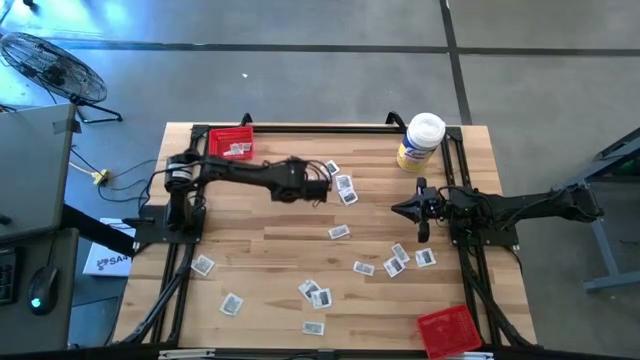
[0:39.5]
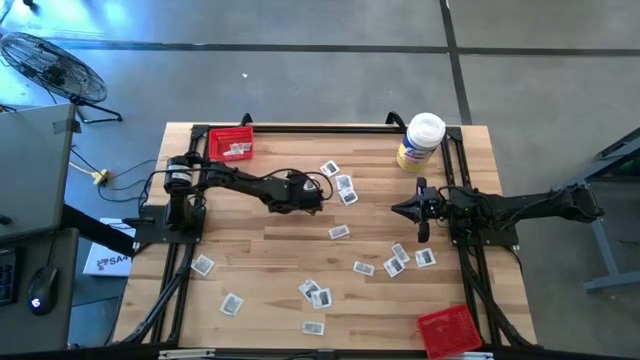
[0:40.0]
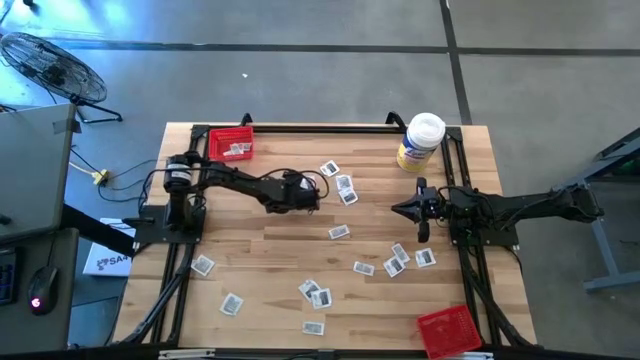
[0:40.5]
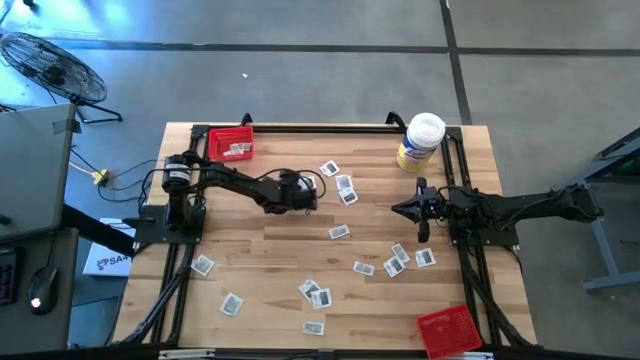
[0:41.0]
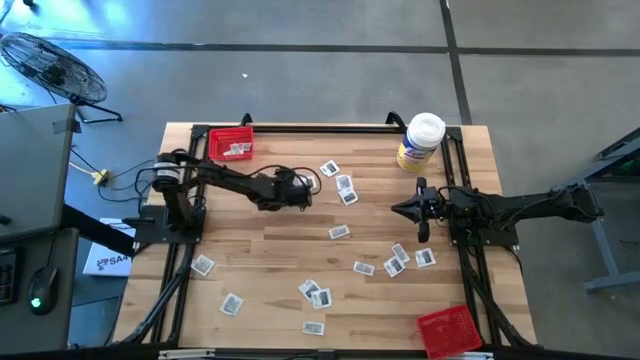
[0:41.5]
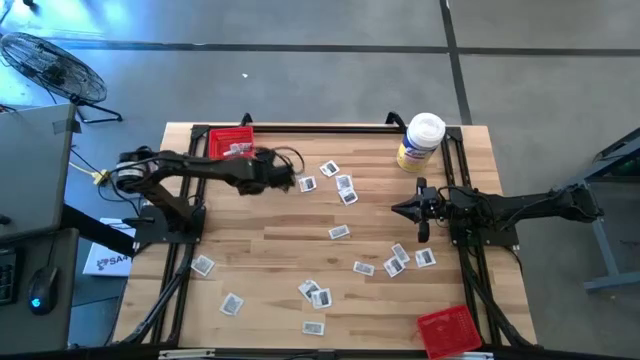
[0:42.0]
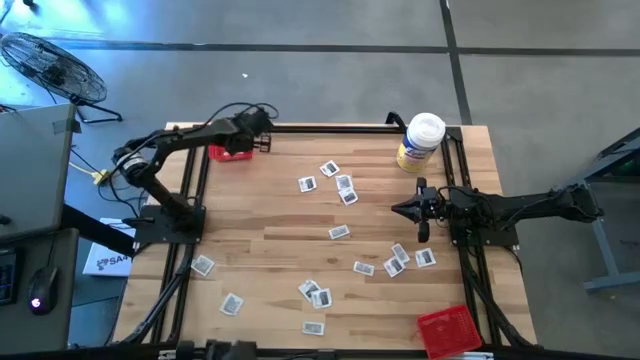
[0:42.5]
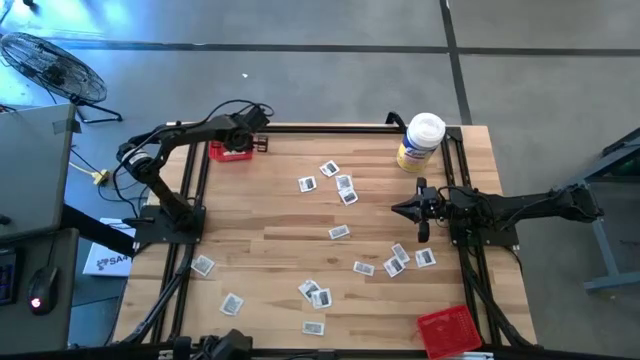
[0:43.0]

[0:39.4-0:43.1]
Task: Pick & Place First Aid Supplies
Put the white and orange ointment pack into the top red bin

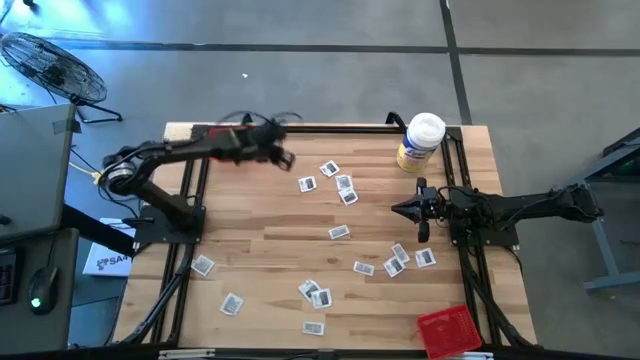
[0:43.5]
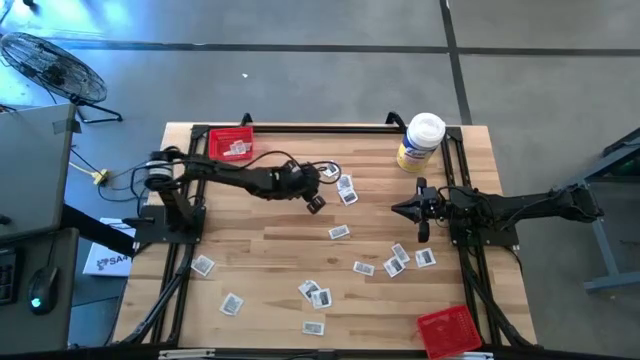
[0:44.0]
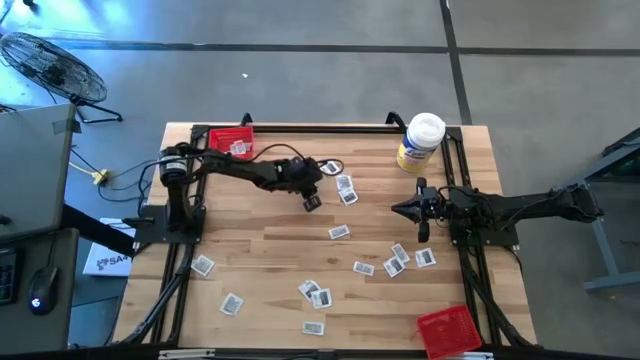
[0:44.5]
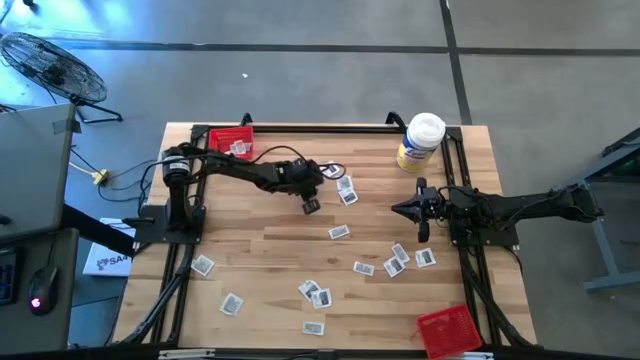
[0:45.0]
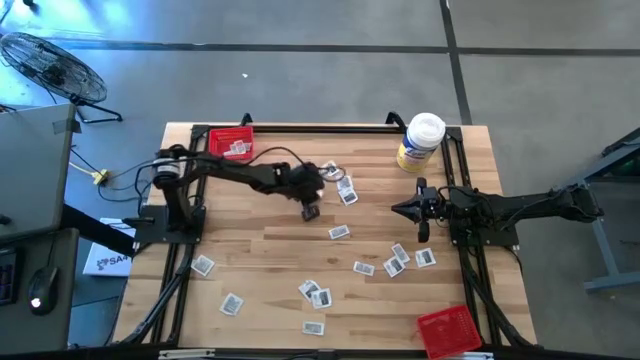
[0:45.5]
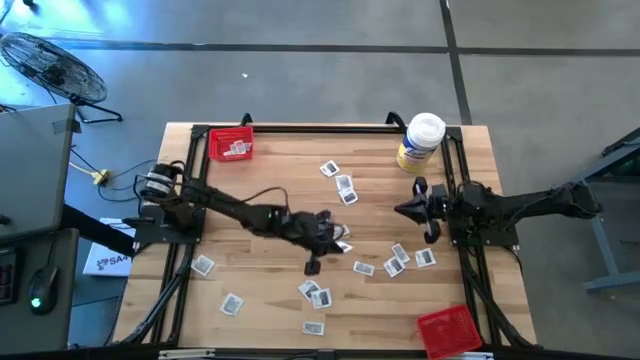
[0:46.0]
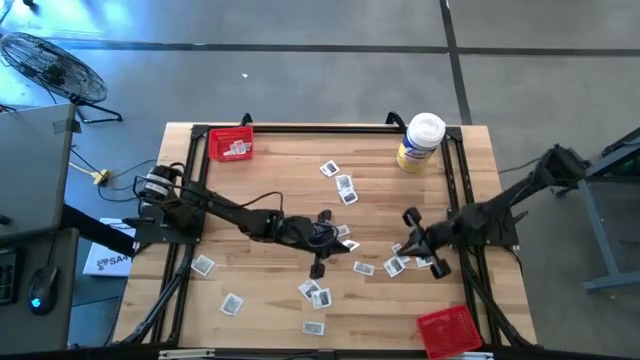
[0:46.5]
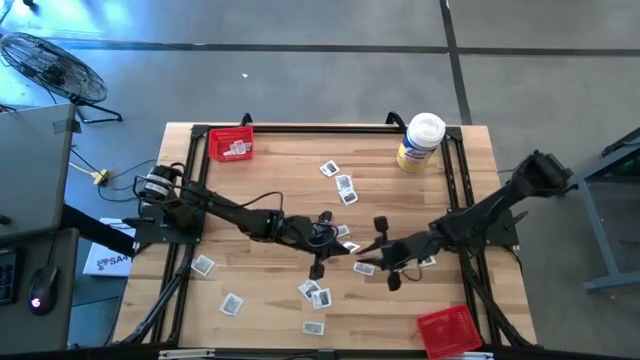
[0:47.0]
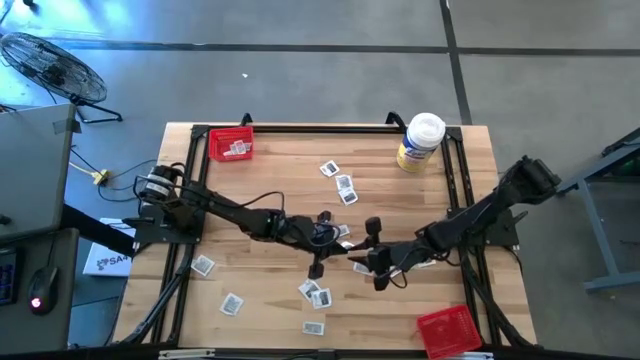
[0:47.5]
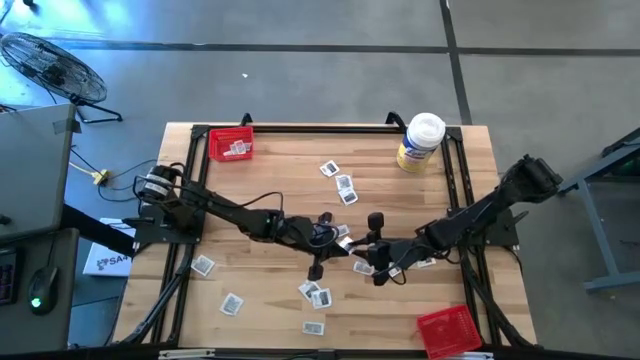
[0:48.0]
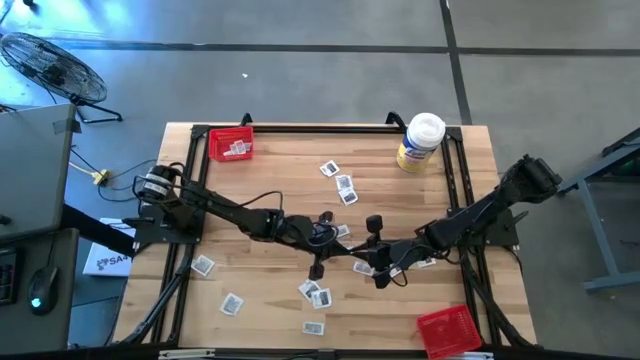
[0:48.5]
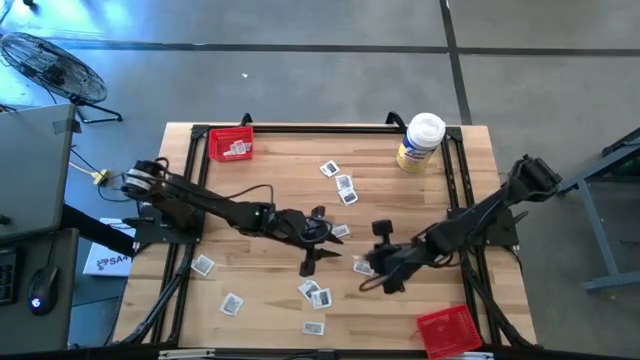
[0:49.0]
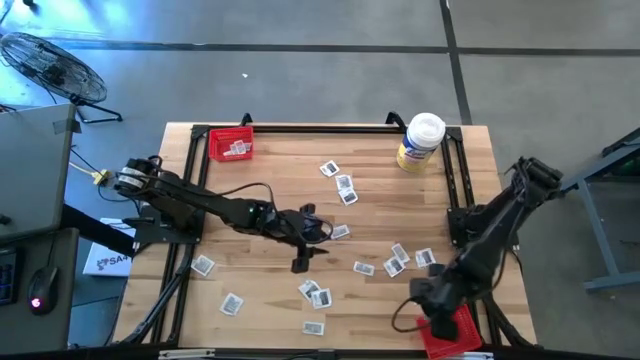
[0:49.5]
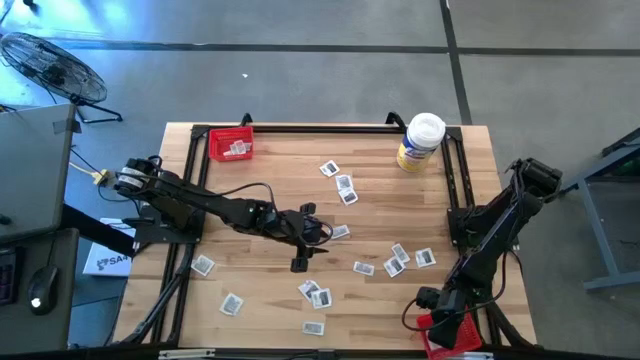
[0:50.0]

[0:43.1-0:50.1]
Put the white and gray towelette pack into the bottom red bin

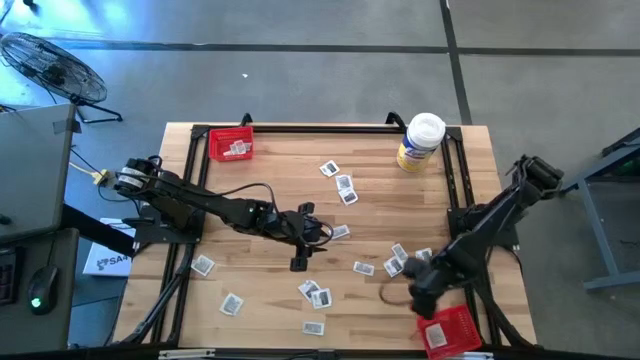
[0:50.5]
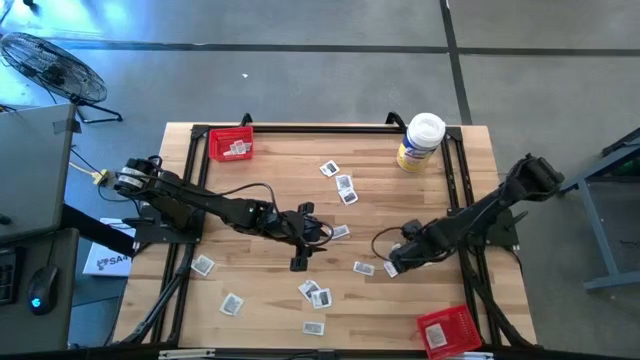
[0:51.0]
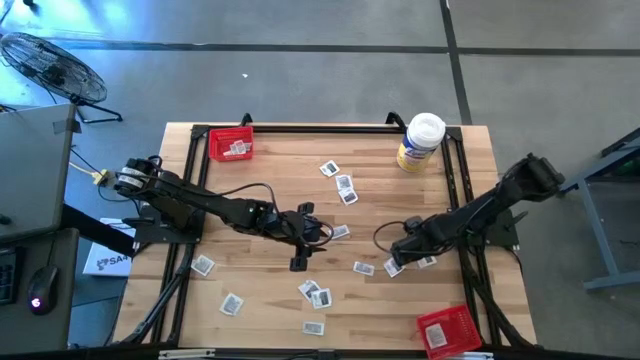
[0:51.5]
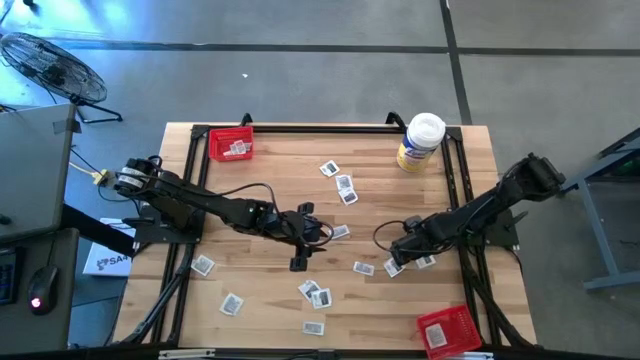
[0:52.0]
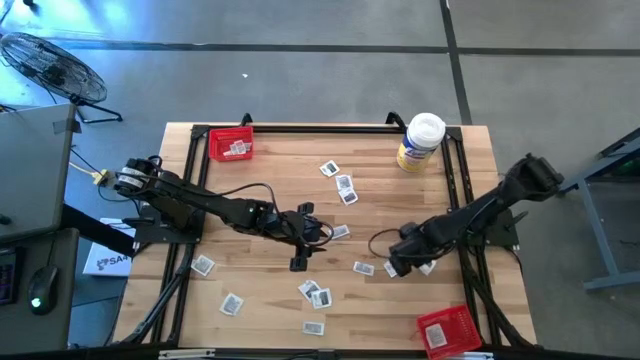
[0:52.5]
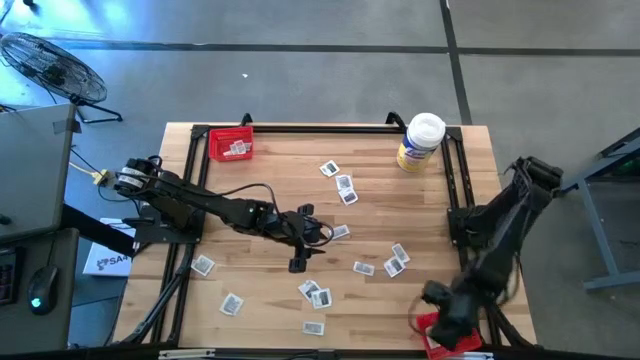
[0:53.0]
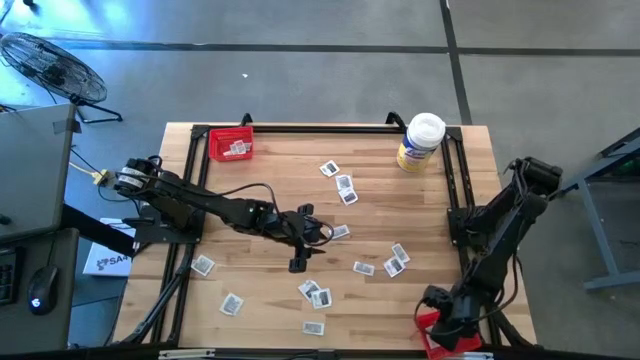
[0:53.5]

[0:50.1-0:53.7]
Put the white and gray towelette pack into the bottom red bin

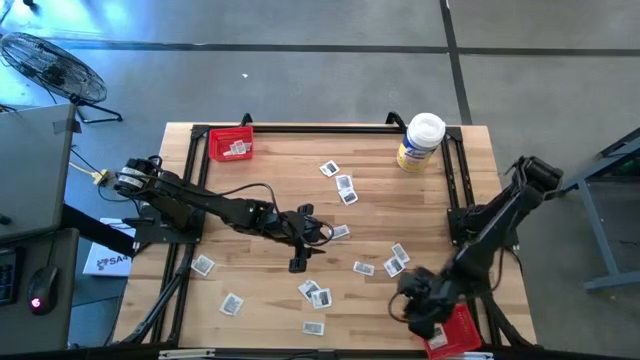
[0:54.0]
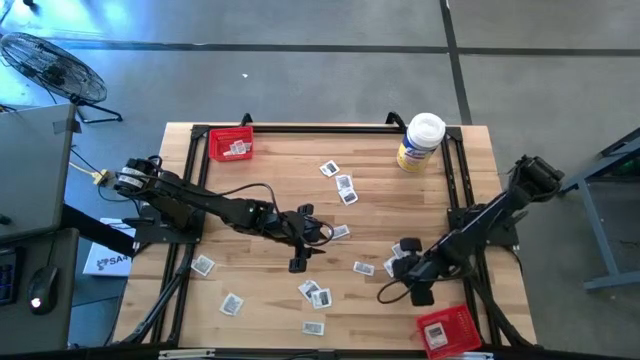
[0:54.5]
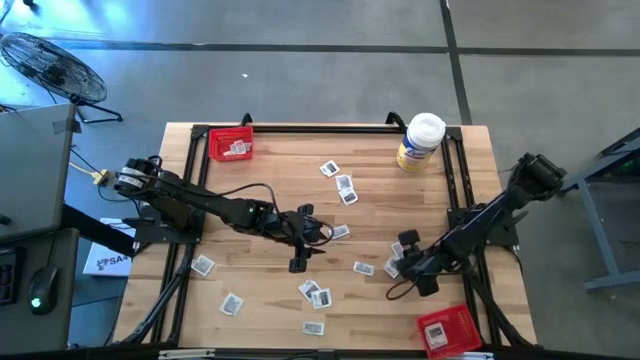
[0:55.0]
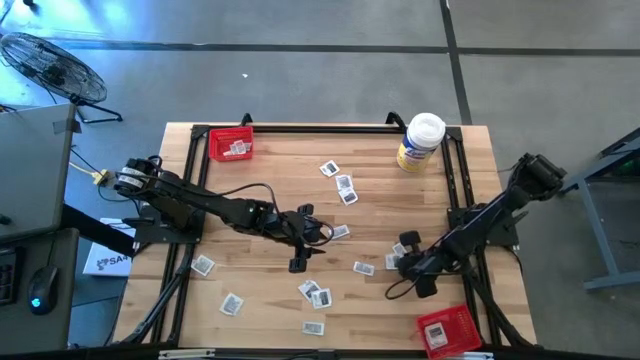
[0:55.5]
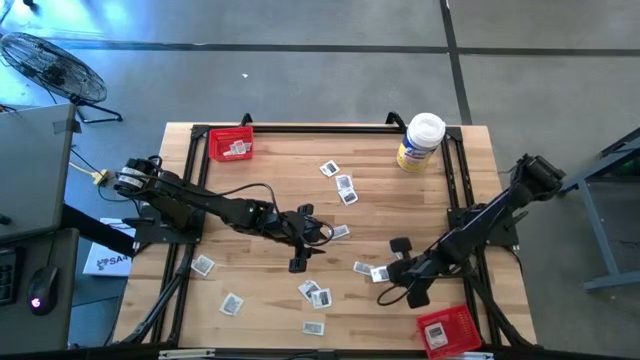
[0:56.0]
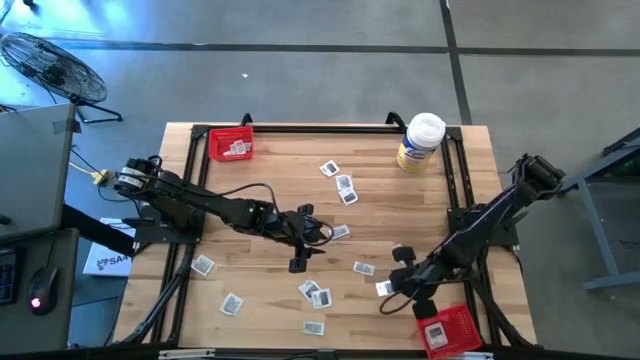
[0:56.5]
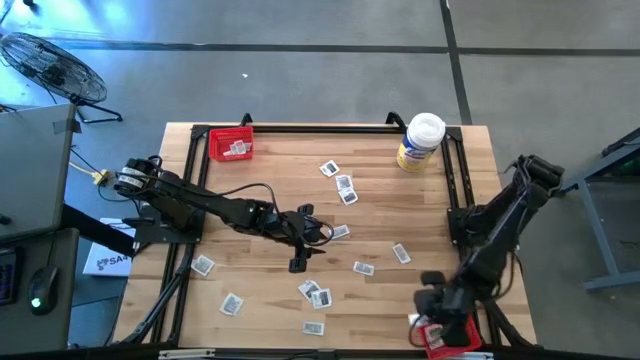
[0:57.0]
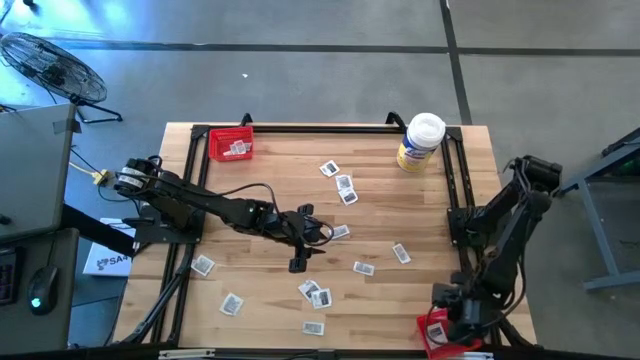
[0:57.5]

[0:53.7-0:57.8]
Put the white and gray towelette pack into the bottom red bin

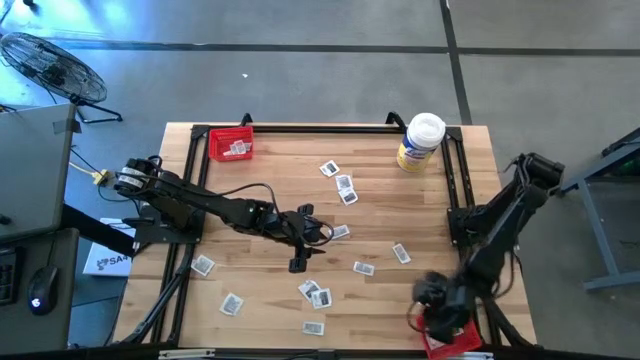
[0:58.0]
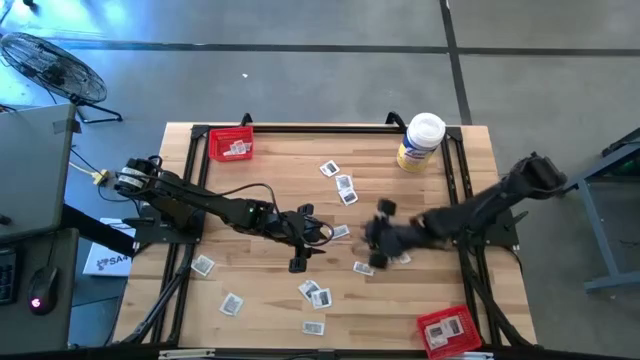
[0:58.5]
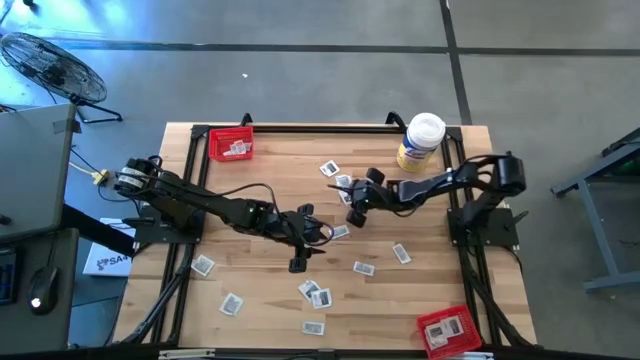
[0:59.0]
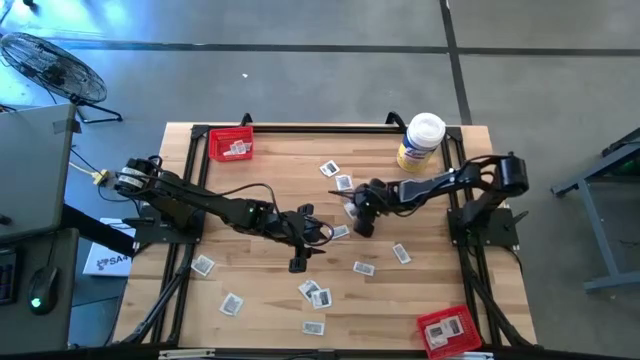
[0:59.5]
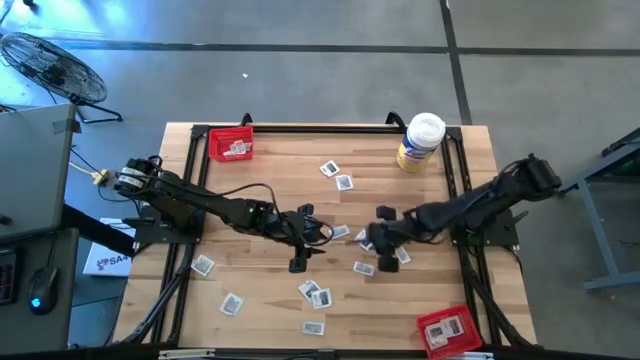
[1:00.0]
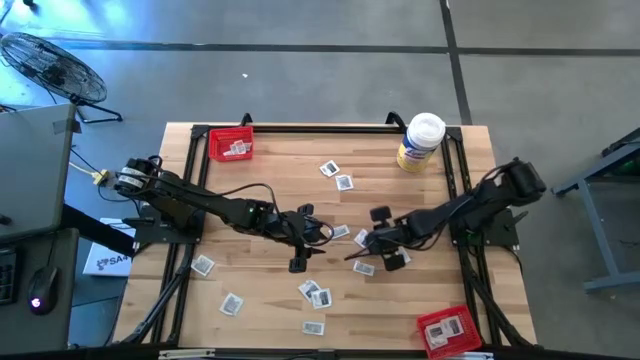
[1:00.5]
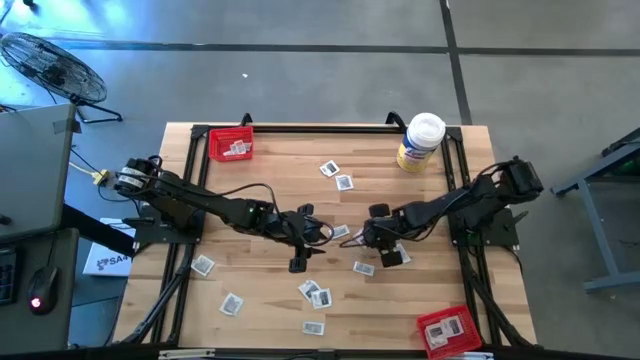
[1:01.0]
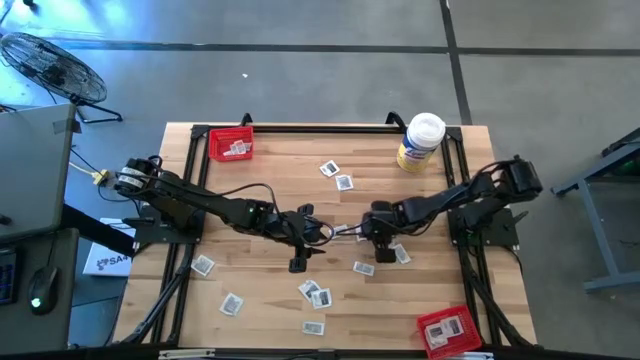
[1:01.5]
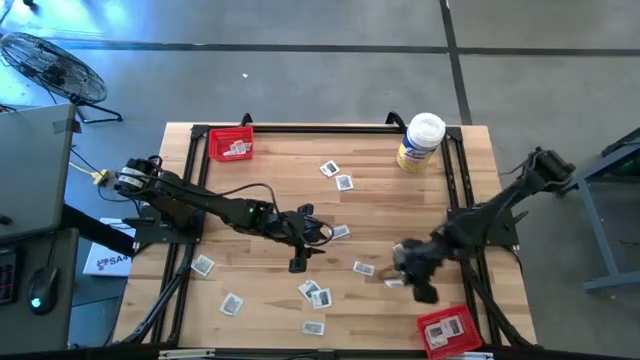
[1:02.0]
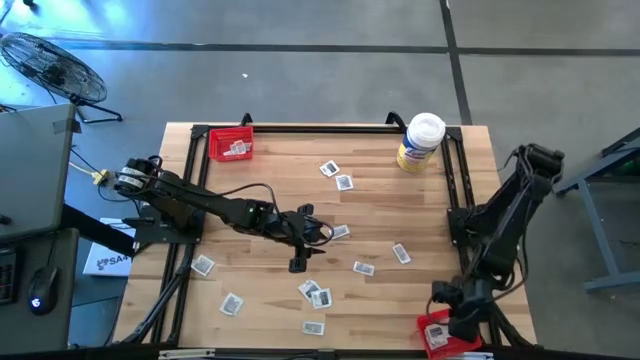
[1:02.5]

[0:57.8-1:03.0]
Put the white and gray towelette pack into the bottom red bin
